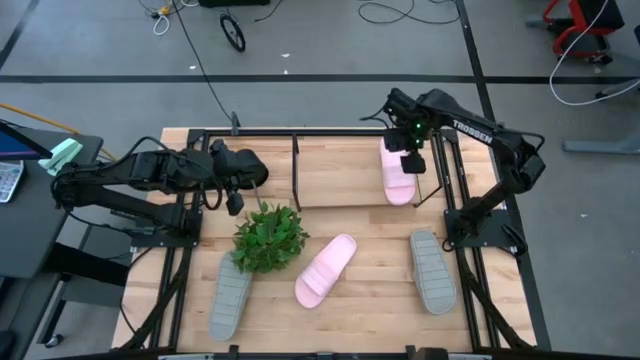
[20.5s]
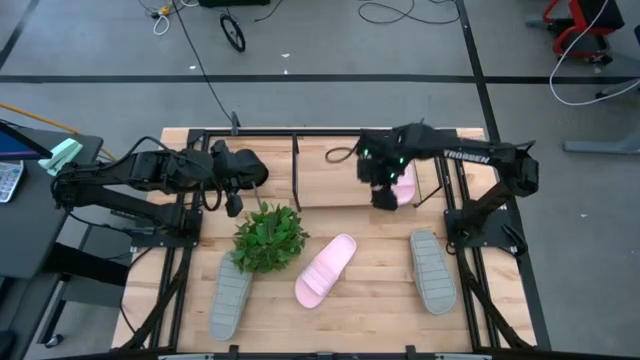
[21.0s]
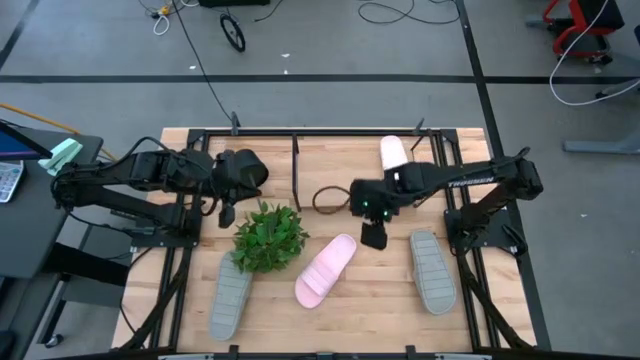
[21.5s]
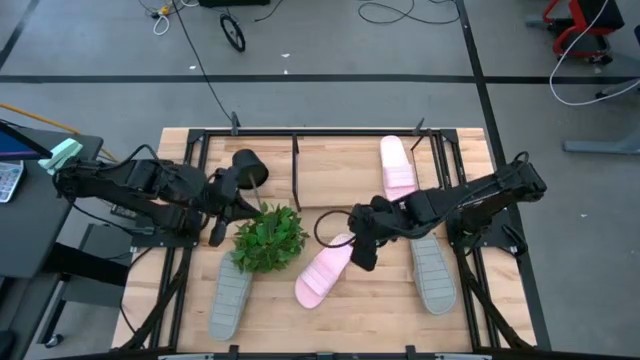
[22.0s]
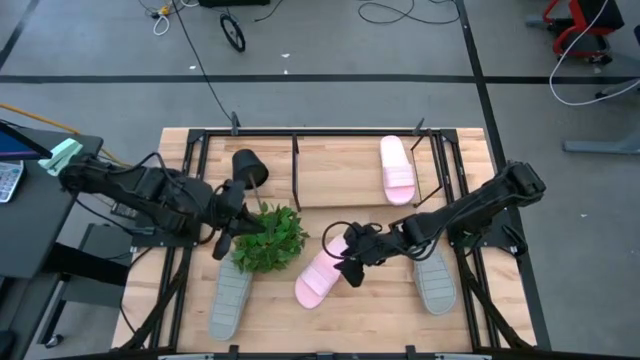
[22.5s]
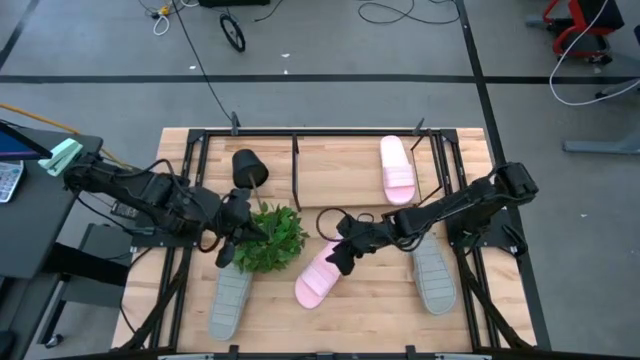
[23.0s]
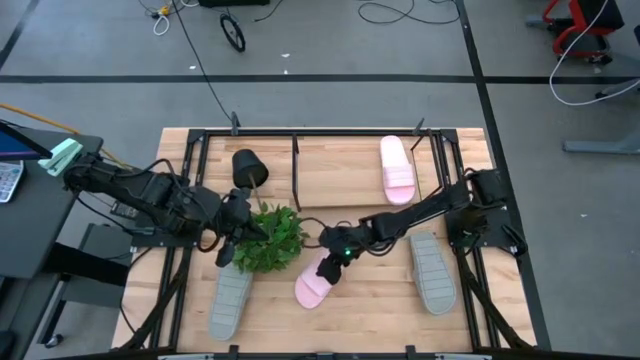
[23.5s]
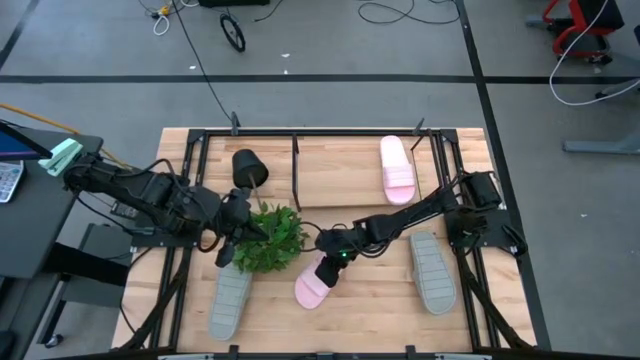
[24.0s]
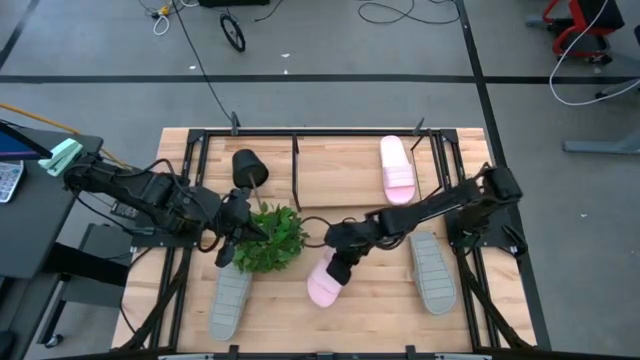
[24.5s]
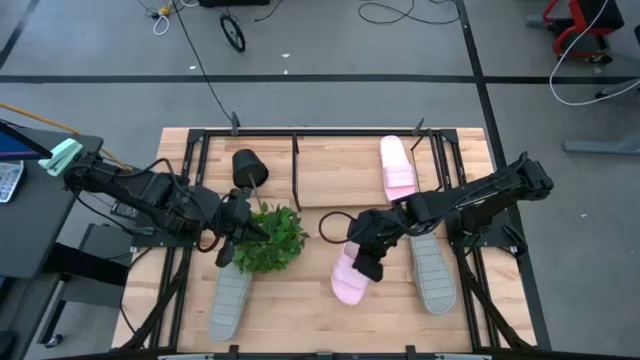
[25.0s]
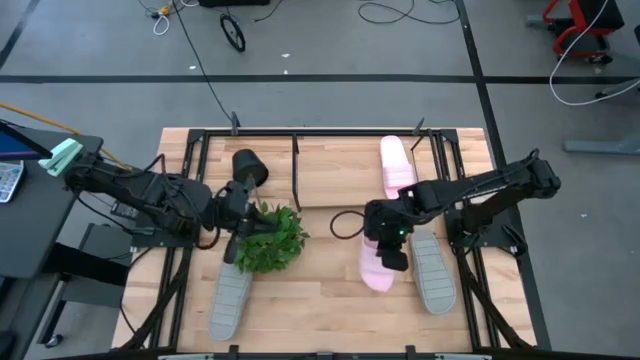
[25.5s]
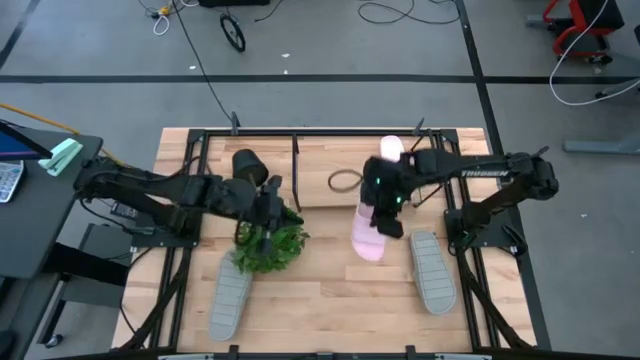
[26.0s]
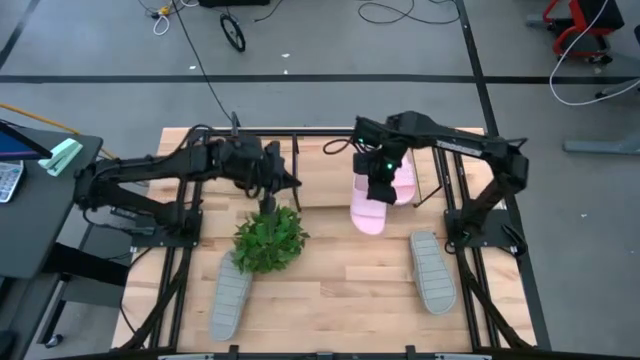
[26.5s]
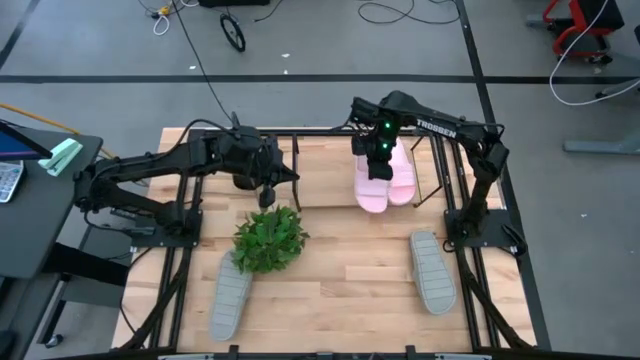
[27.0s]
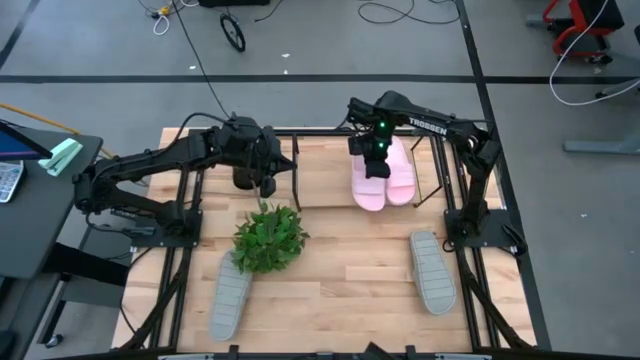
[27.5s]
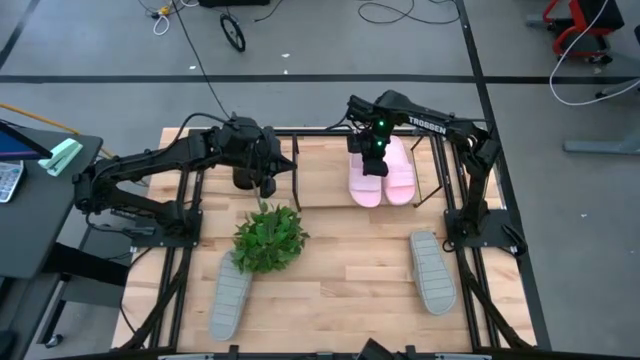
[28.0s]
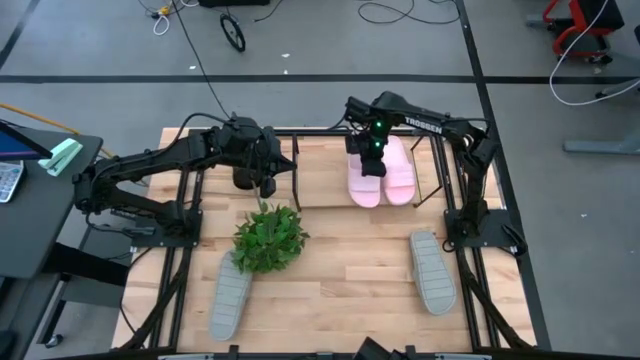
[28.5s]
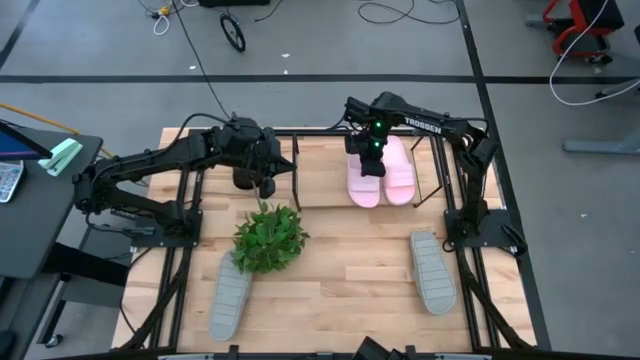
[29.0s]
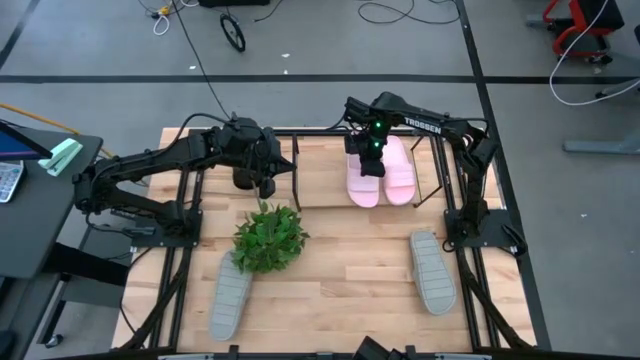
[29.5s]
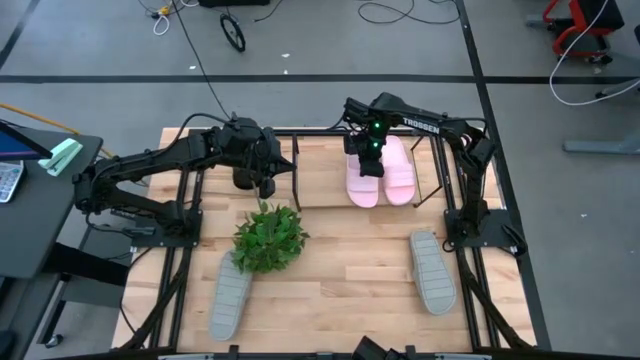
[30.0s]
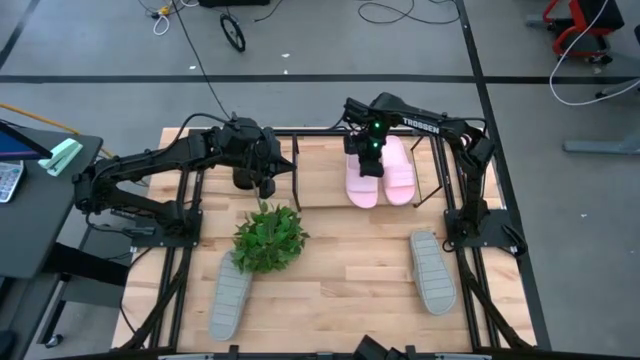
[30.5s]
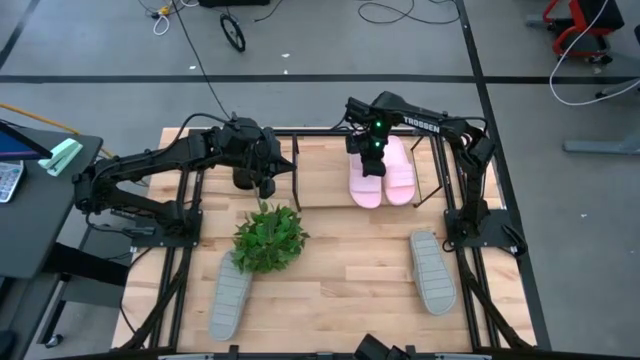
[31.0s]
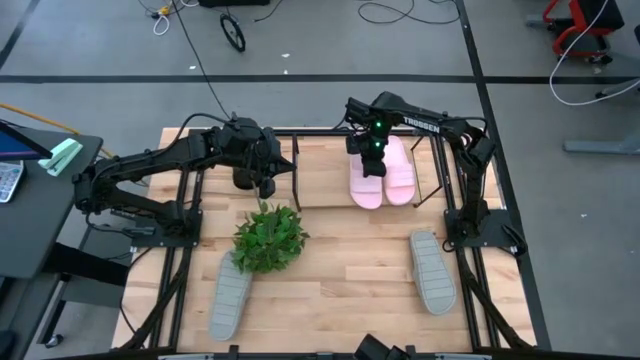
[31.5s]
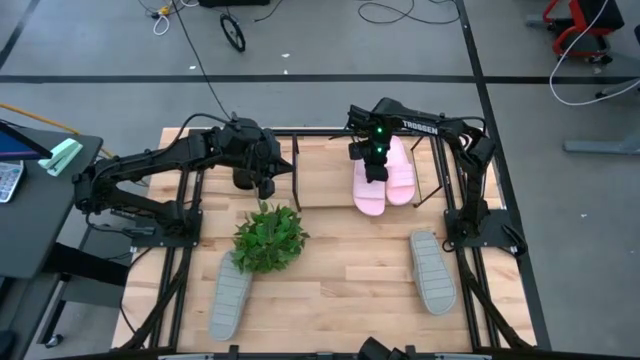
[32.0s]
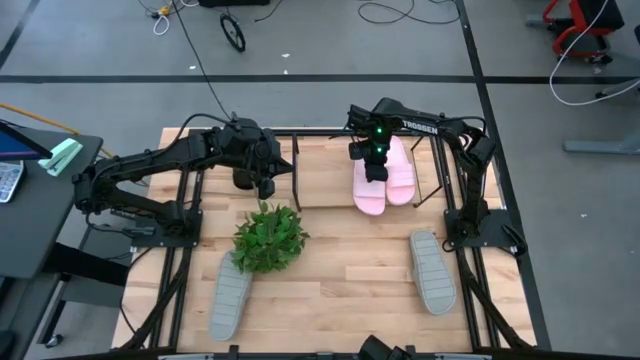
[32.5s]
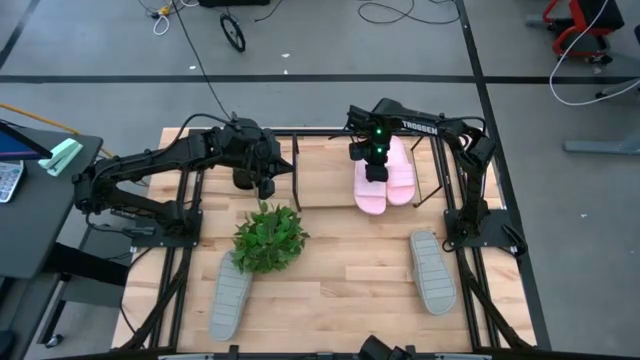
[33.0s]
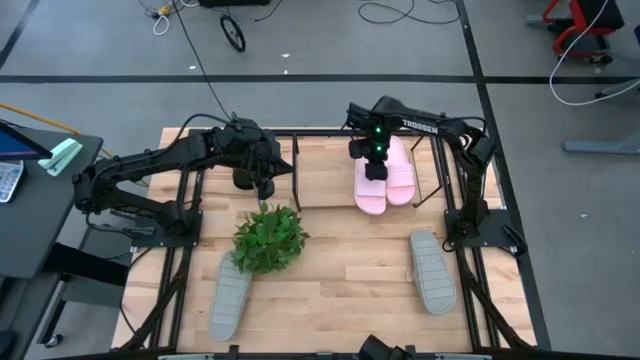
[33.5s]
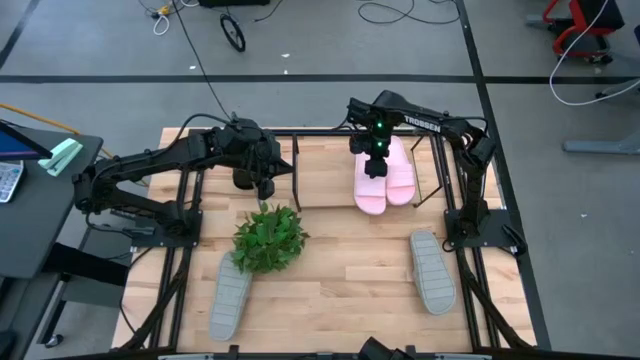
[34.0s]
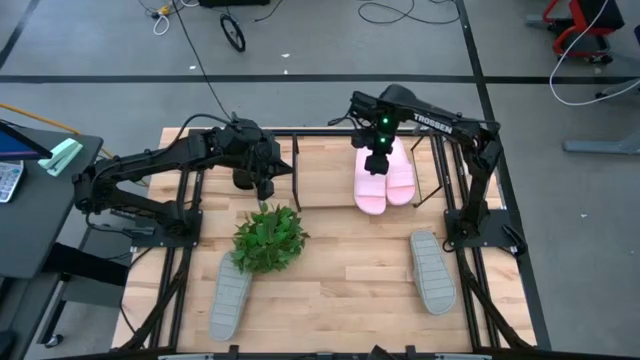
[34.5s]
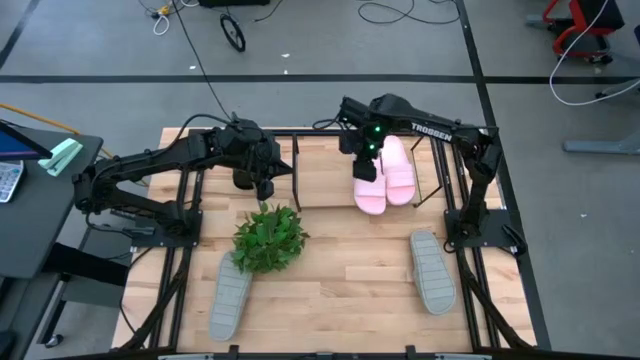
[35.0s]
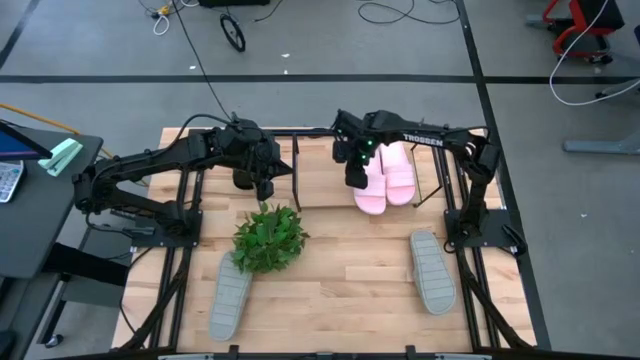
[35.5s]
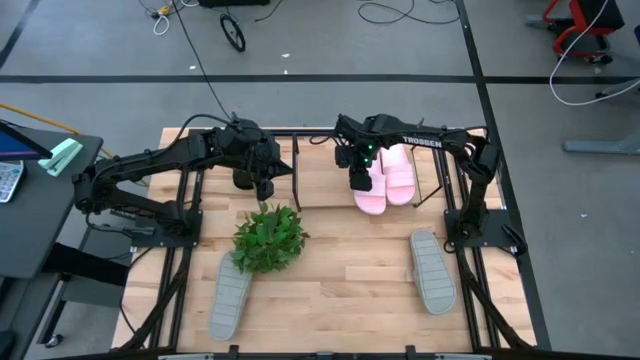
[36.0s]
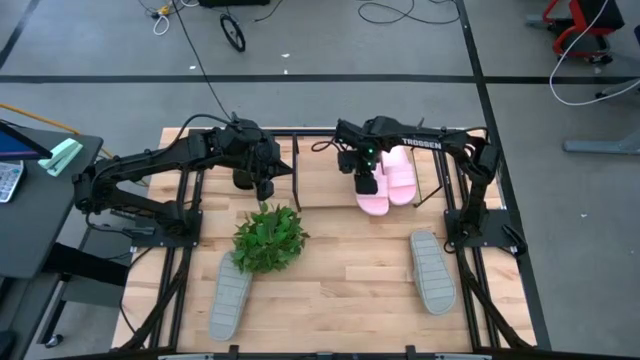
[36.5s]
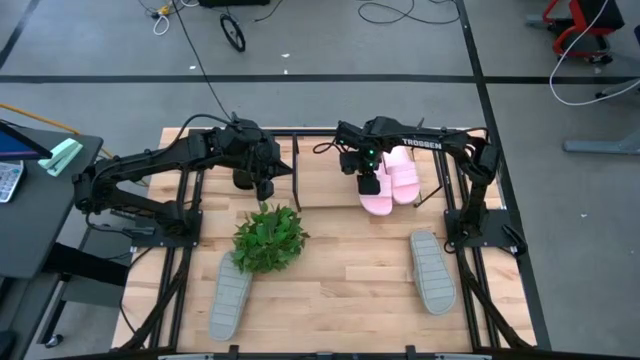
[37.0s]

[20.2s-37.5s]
Task: Pick and place slides into the shelf
Put the pink slide on the shelf

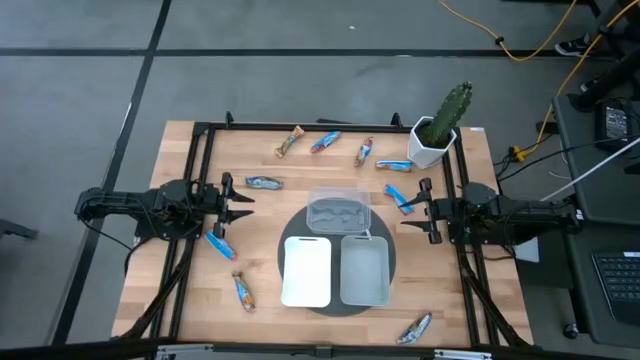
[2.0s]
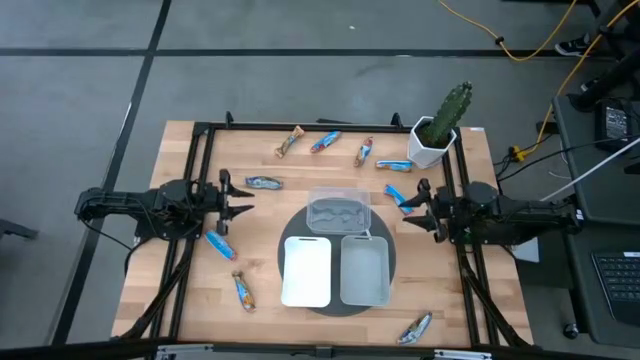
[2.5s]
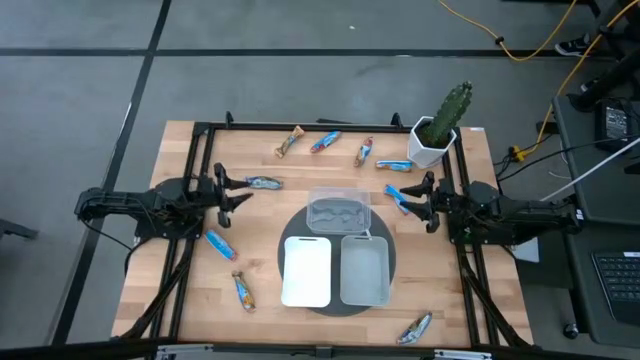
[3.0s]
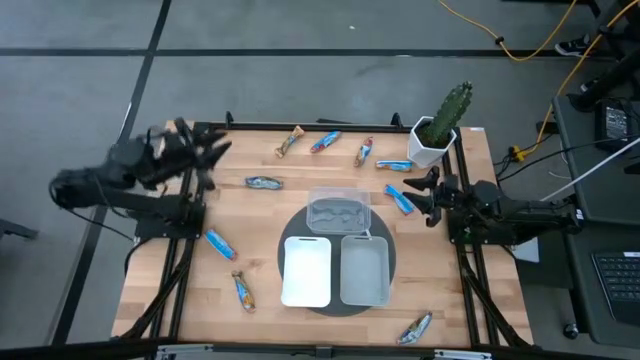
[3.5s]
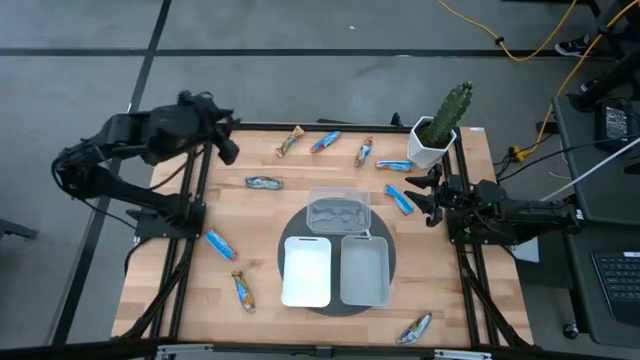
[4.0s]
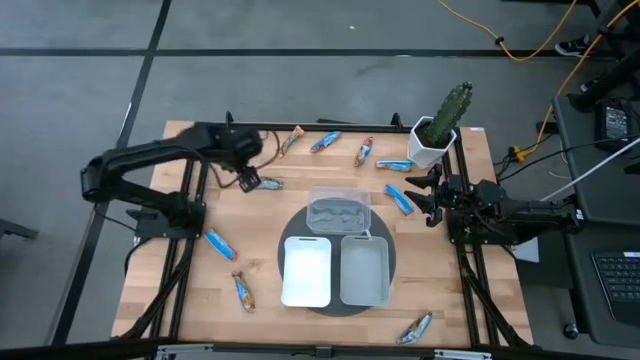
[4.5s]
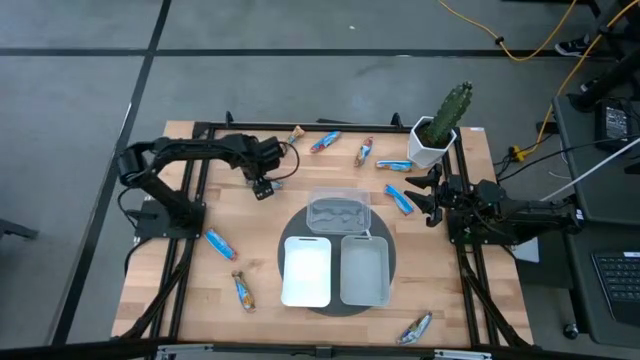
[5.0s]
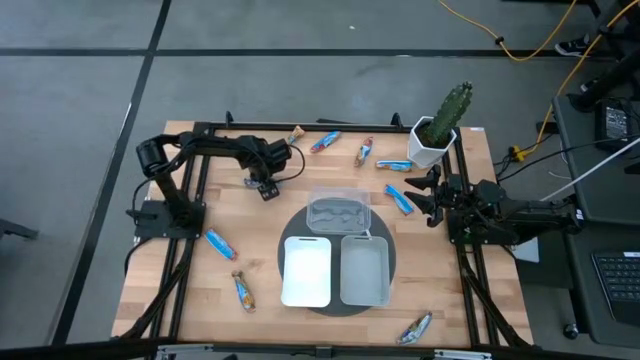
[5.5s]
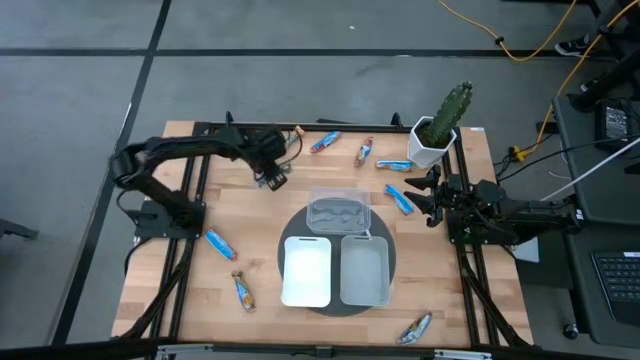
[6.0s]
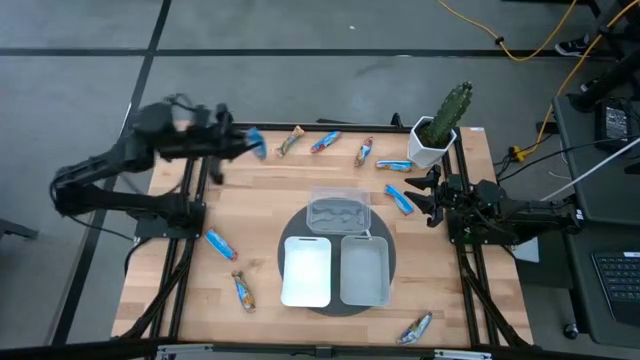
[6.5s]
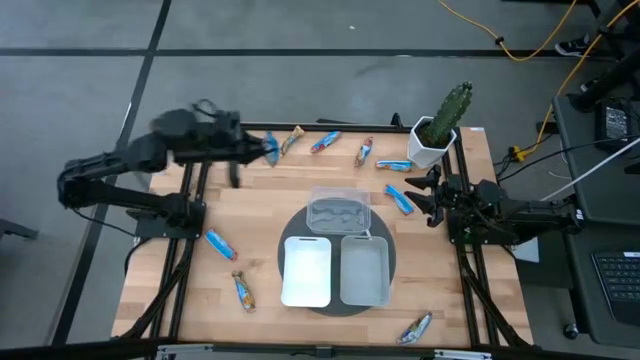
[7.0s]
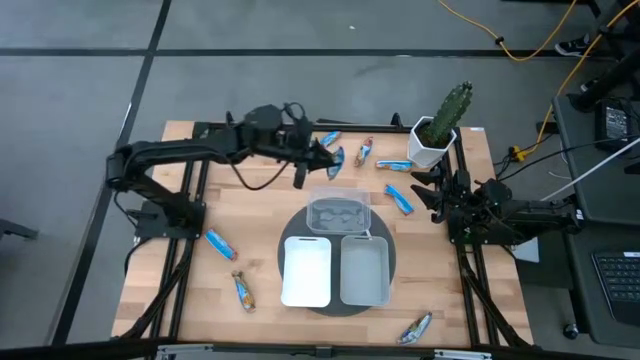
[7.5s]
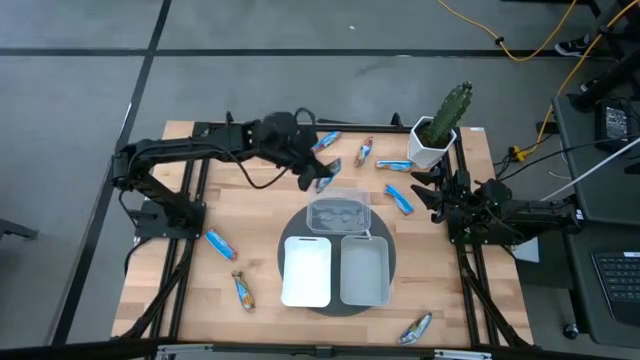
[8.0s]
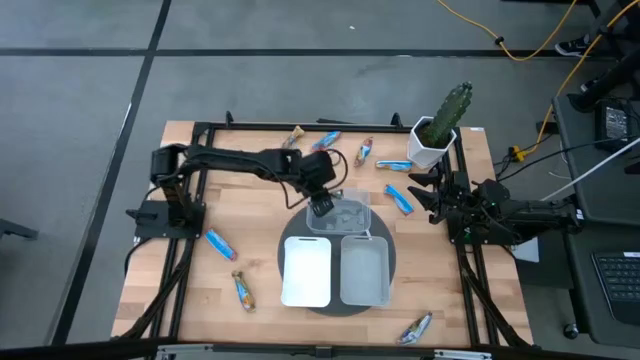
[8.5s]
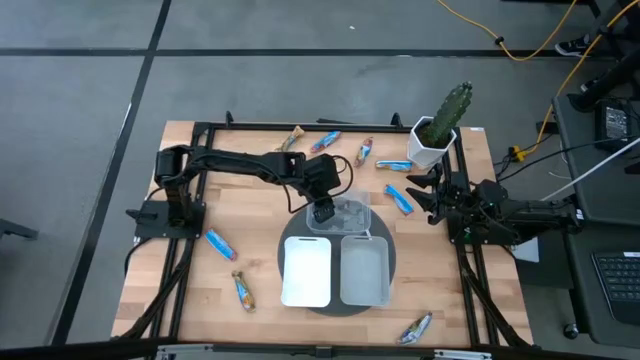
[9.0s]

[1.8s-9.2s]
Task: Pick and place Granola Bars by type
Put the left blue chocolate chip into the transparent bin
